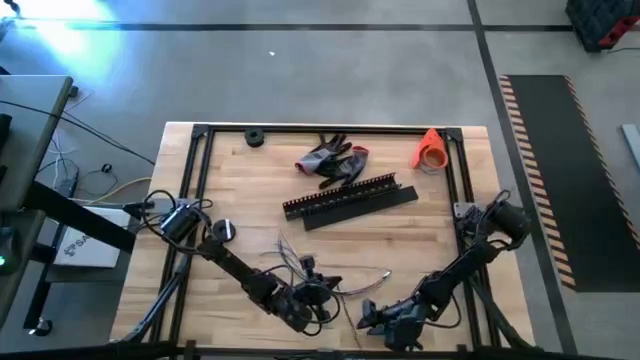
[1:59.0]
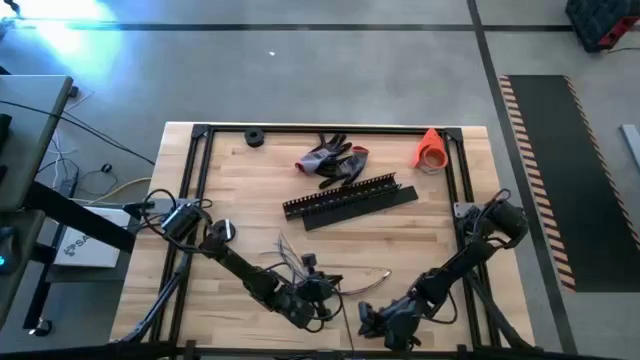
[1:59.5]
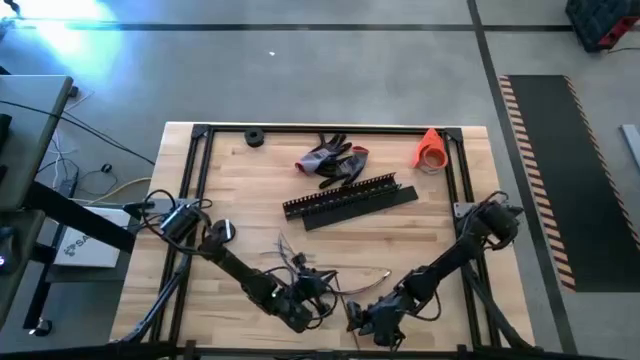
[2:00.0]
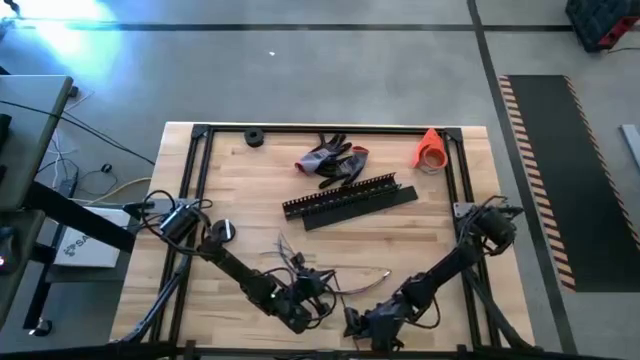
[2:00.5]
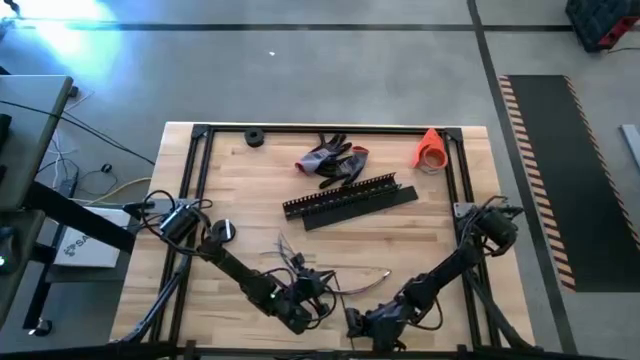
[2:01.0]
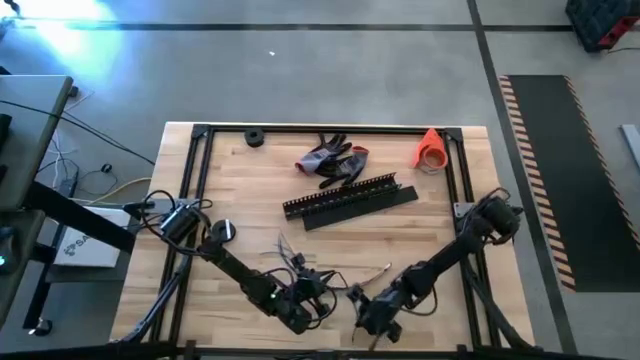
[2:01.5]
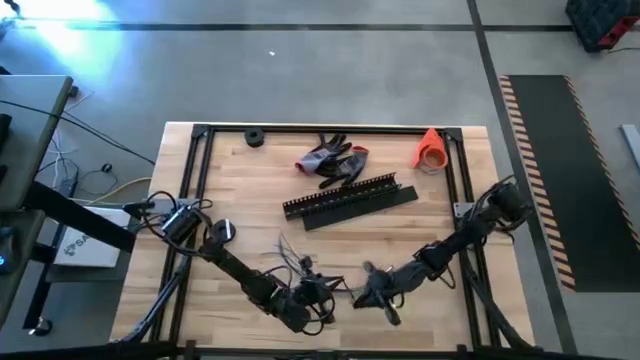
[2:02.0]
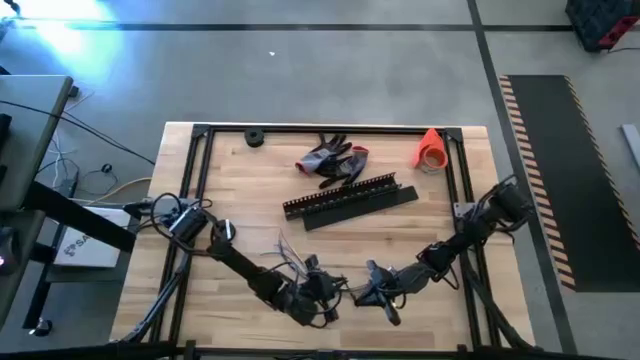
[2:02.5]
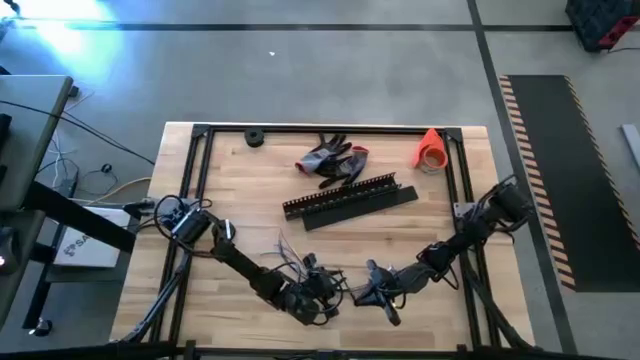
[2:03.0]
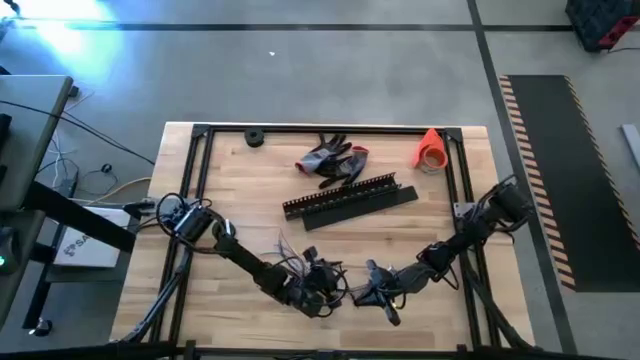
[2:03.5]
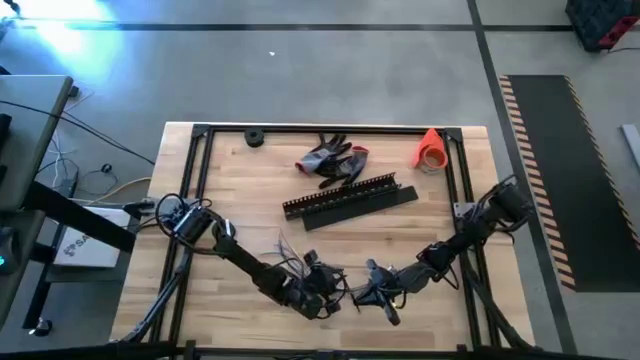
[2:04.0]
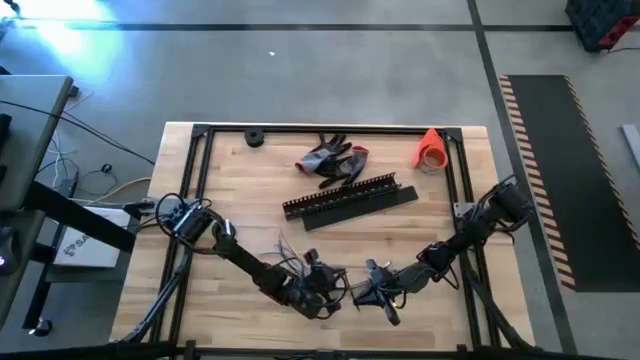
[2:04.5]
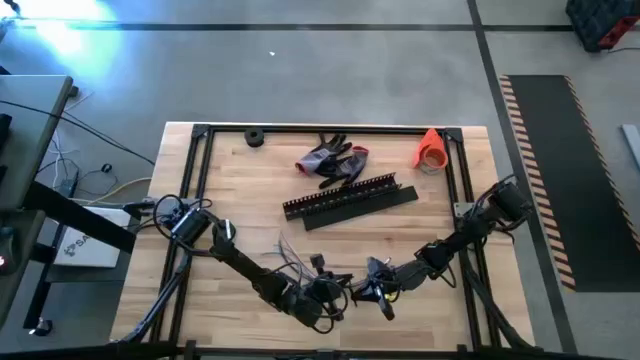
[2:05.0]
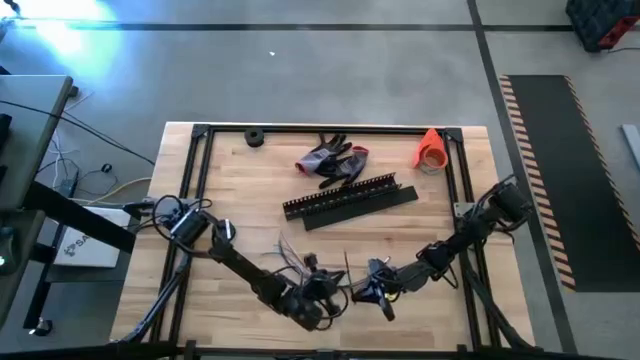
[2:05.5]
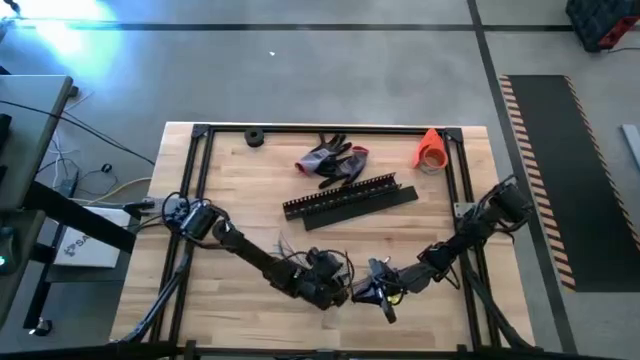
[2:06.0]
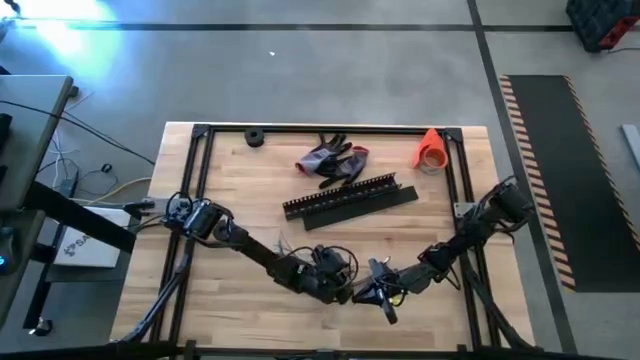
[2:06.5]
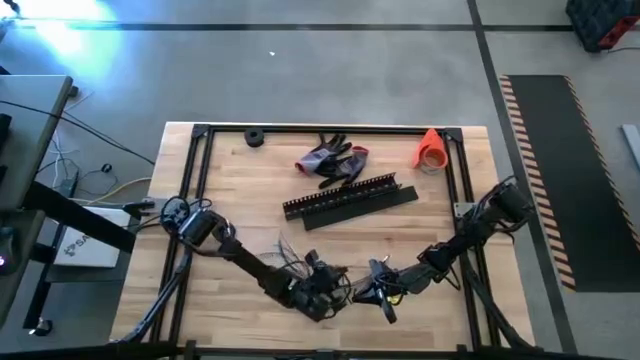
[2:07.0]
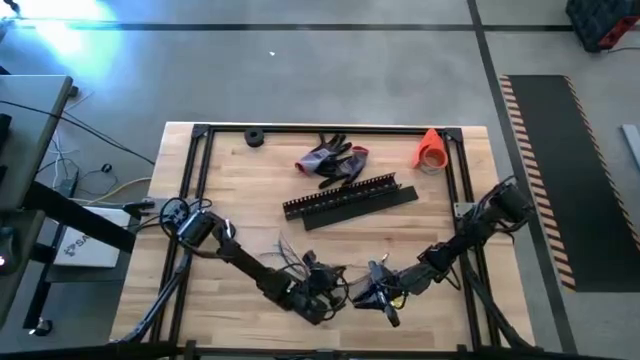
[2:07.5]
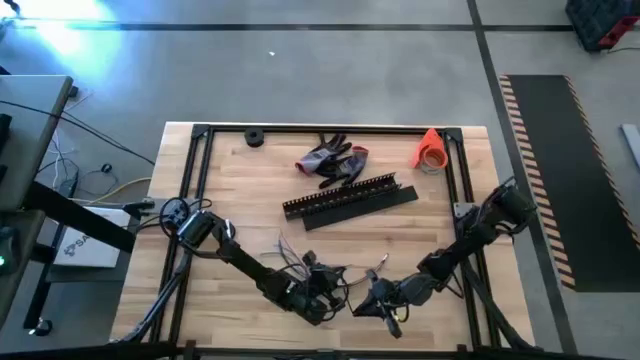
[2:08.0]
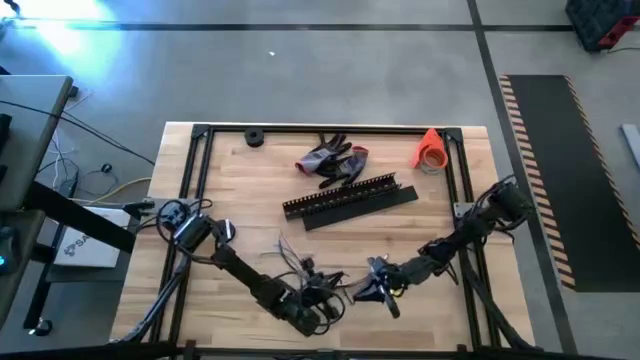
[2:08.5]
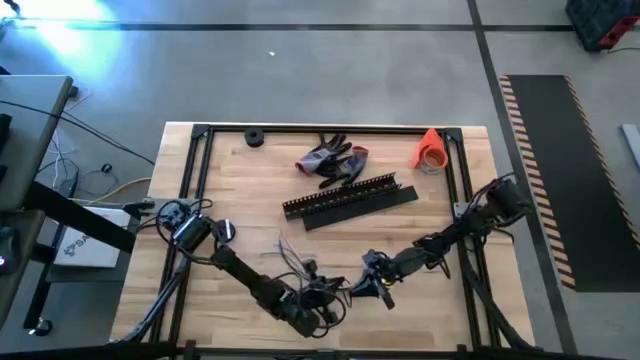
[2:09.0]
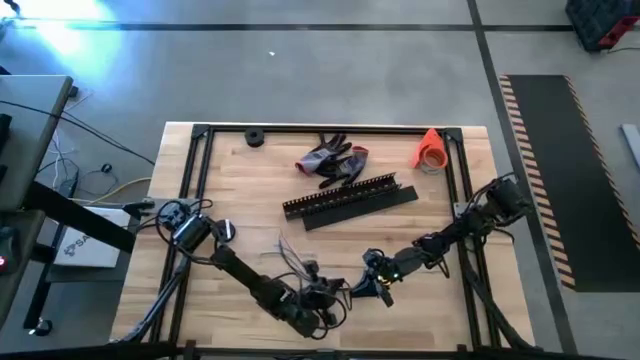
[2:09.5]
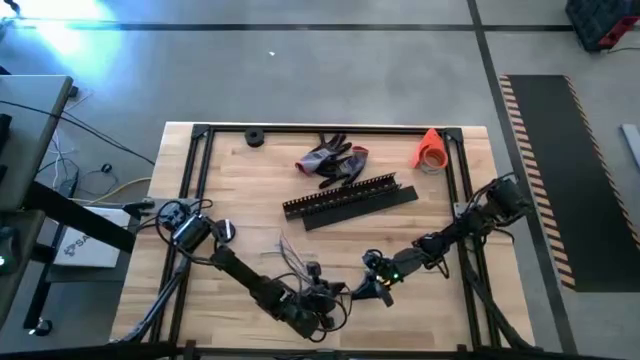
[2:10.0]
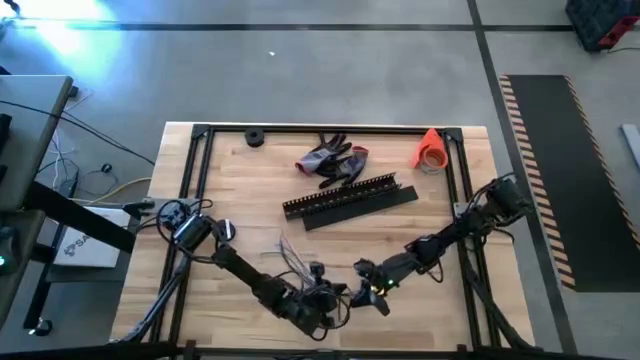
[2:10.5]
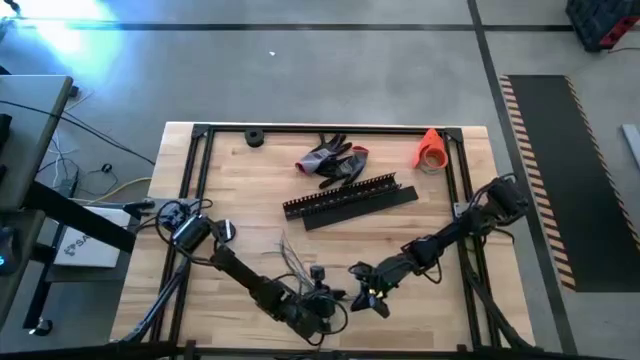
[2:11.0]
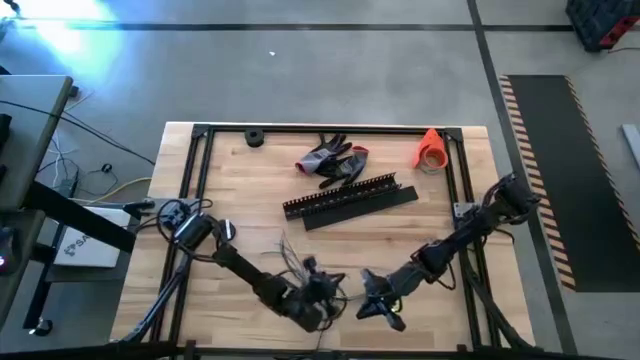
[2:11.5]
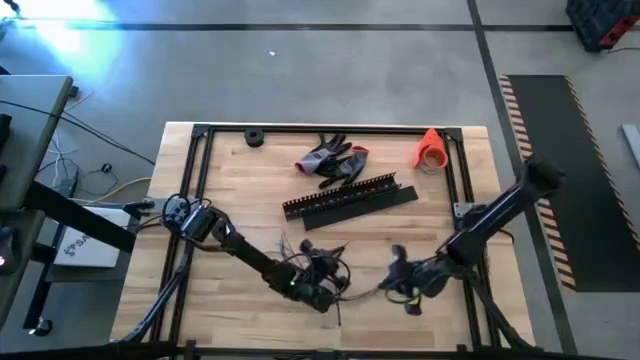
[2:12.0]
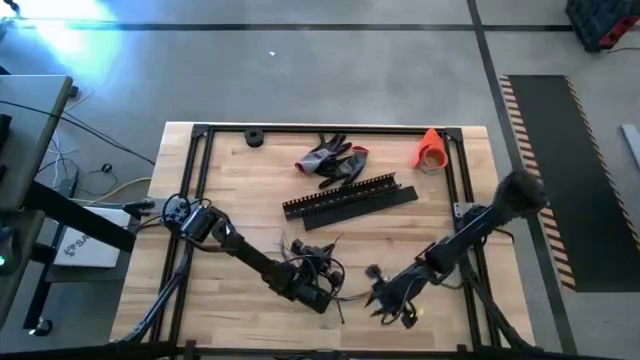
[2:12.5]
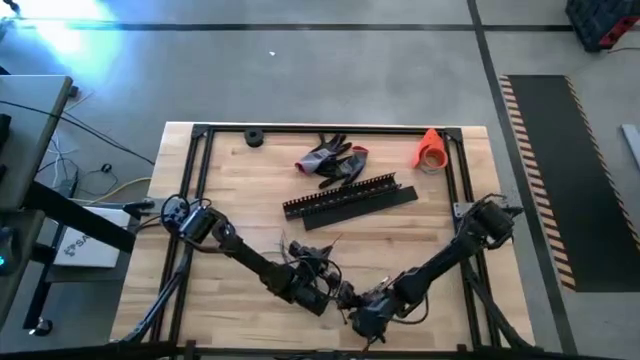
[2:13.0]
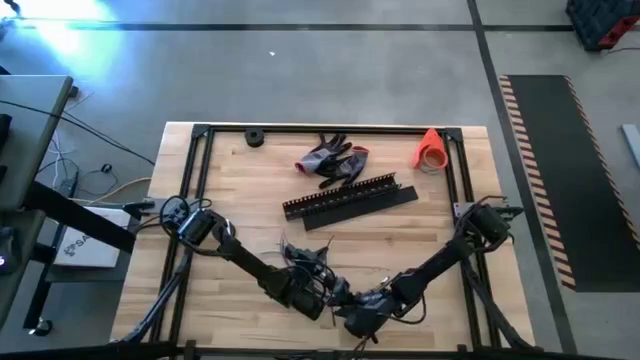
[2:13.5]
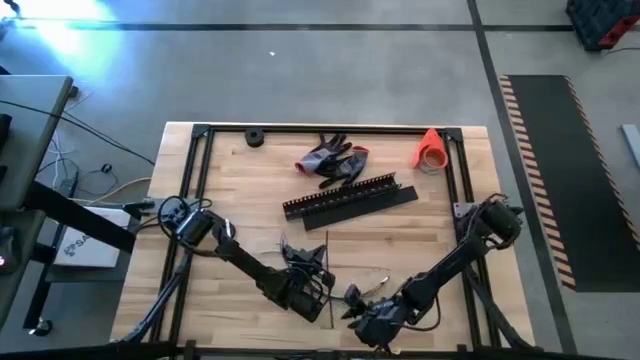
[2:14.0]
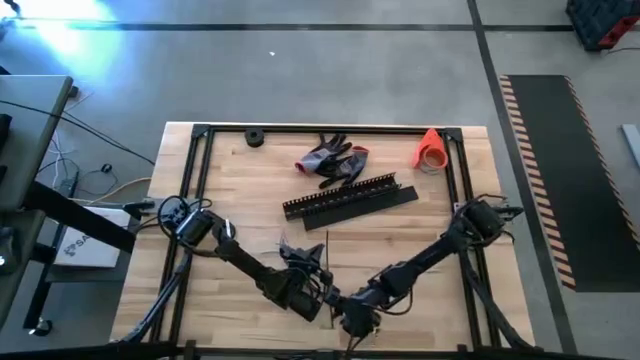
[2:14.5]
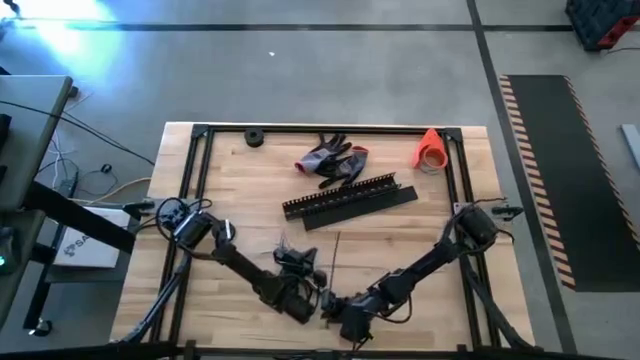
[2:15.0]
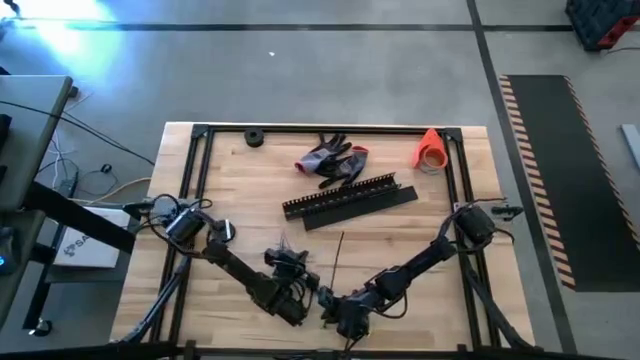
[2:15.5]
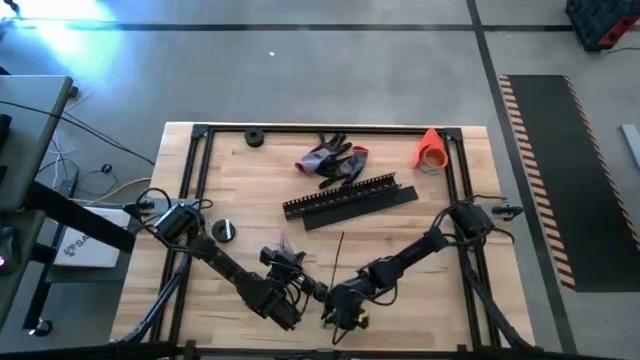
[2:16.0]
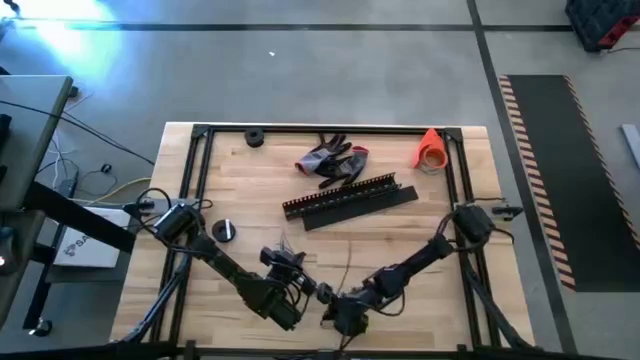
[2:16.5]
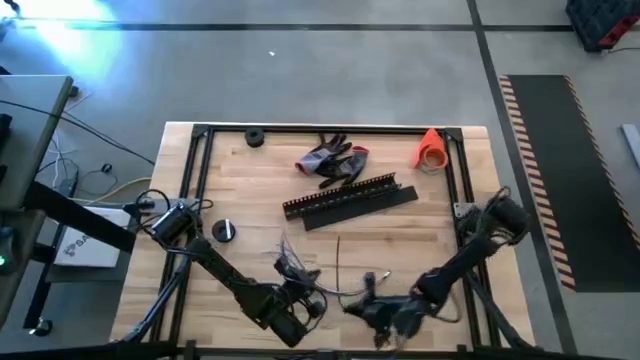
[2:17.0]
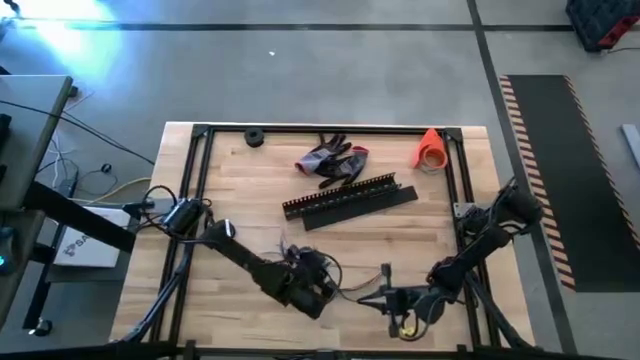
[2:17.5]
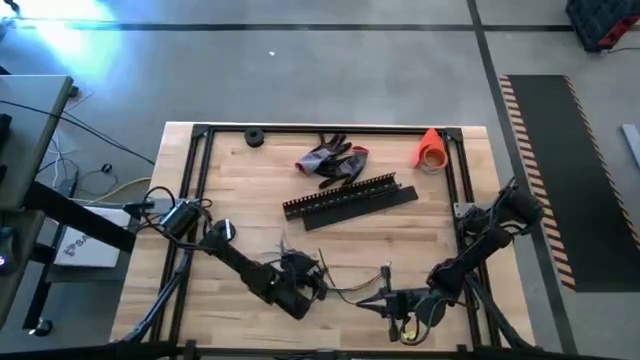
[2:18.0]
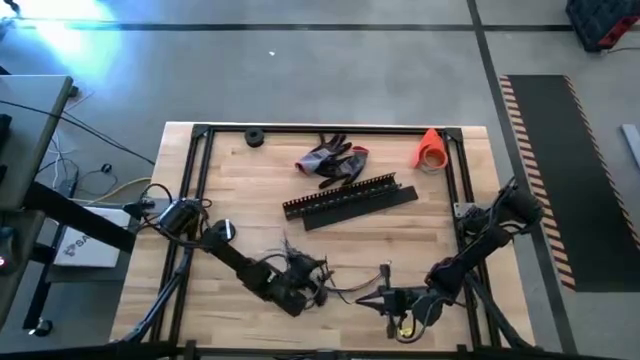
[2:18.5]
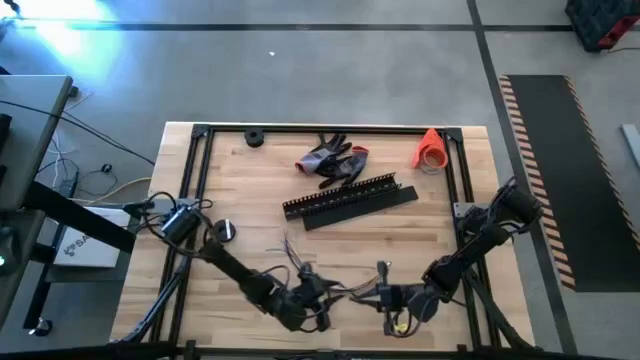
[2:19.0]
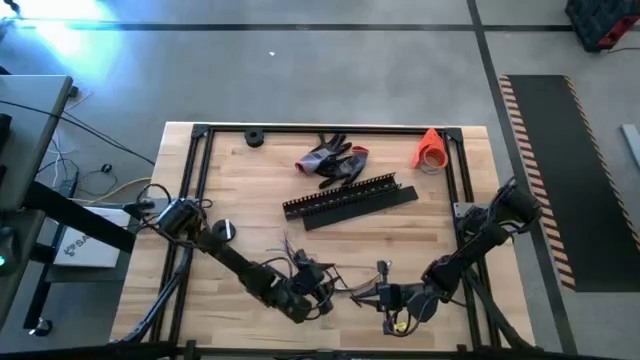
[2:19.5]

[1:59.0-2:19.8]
Task: Ziptie cables
Wrap the cables using a black zip tie
